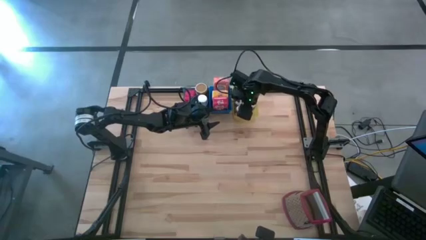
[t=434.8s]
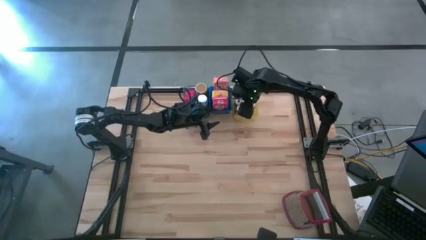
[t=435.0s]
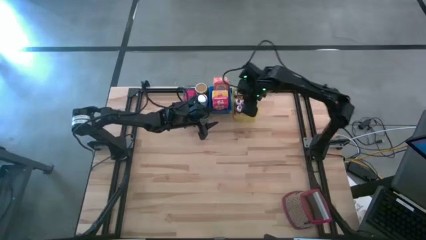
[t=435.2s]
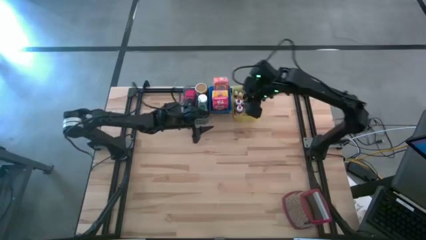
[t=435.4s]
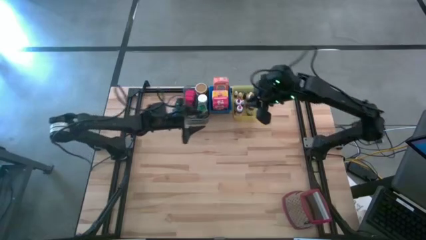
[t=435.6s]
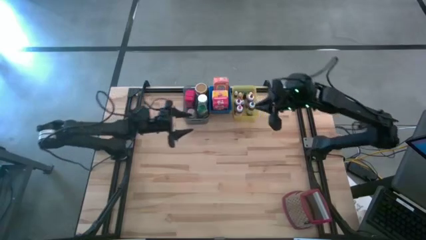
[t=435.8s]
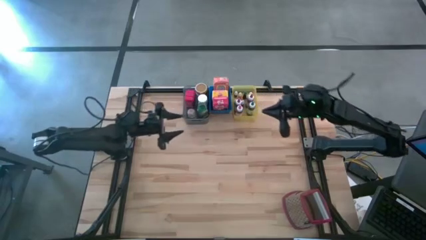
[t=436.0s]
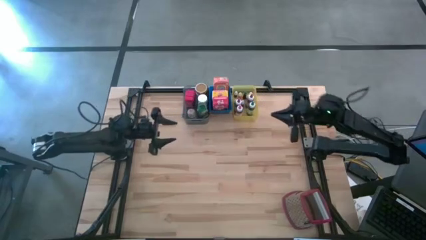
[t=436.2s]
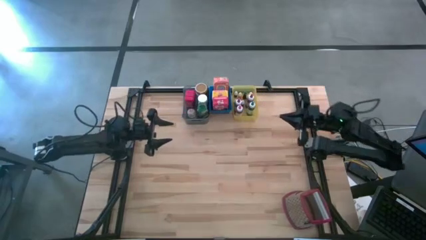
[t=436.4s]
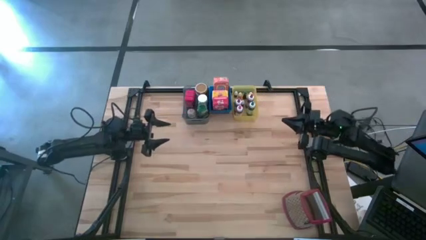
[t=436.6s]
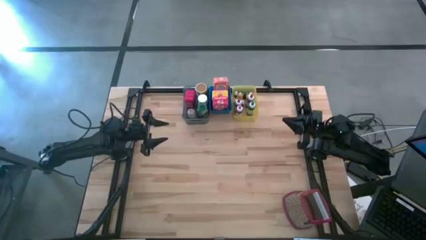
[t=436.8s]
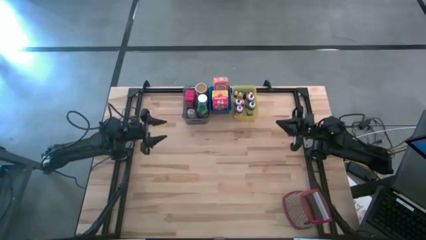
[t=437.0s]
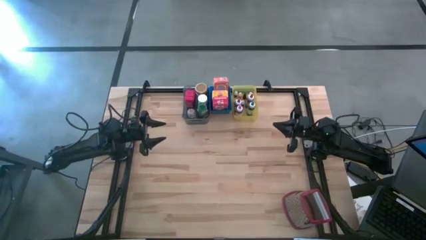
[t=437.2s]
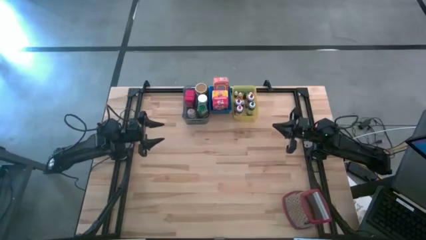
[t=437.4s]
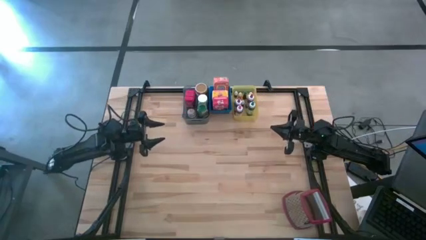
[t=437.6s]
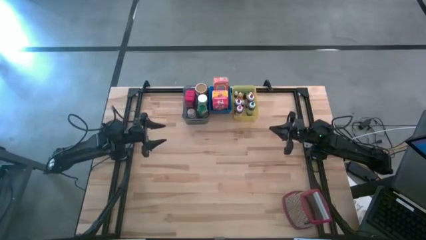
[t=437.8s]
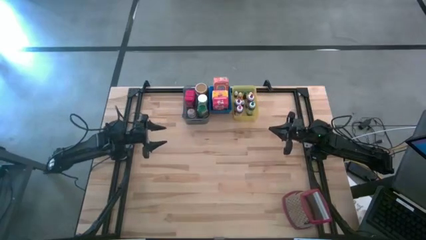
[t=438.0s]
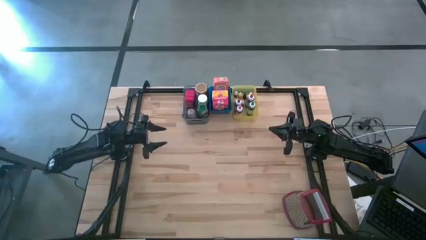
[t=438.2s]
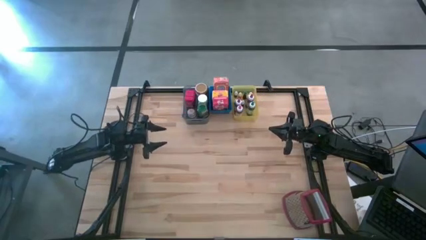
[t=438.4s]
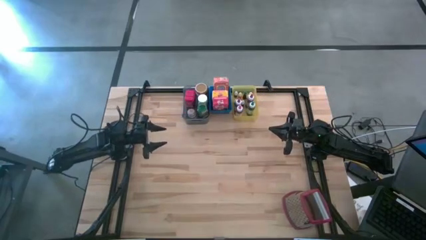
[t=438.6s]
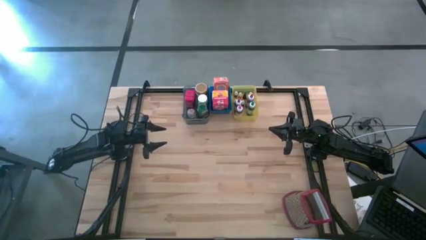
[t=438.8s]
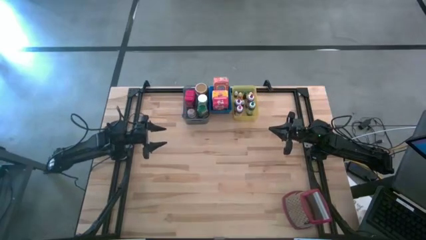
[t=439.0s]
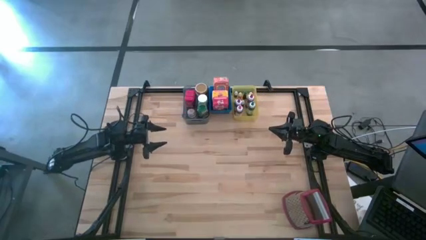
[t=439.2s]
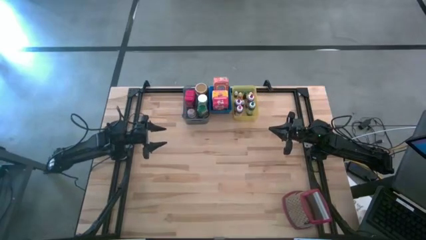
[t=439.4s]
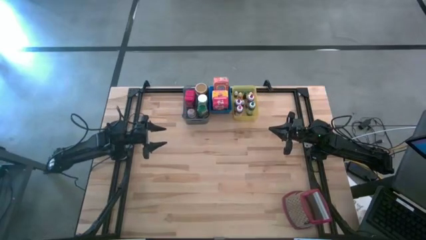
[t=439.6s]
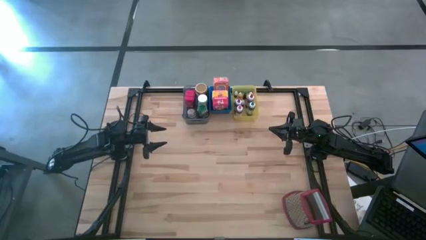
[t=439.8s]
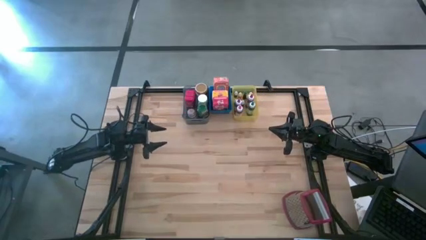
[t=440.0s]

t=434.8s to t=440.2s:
Task: Pick & Place Kitchen Items
Return to Home Position

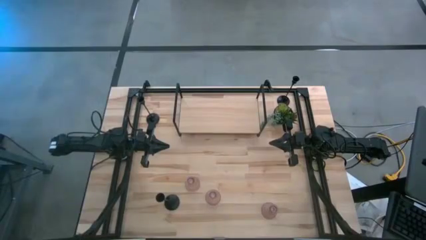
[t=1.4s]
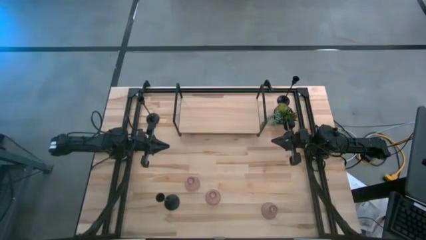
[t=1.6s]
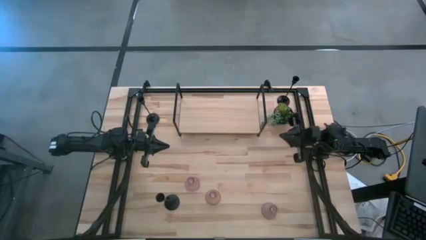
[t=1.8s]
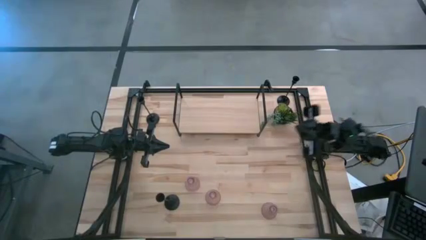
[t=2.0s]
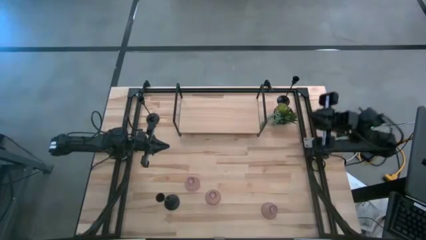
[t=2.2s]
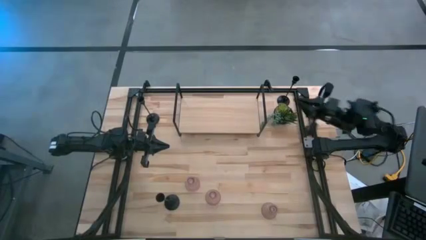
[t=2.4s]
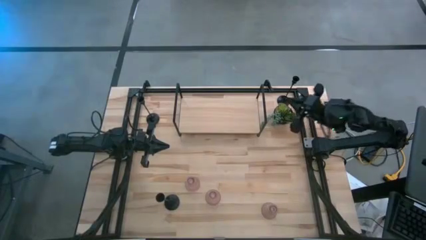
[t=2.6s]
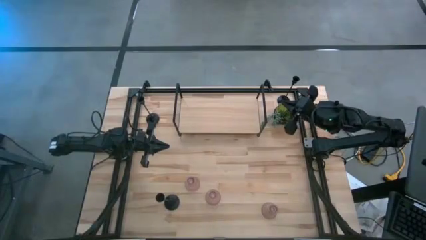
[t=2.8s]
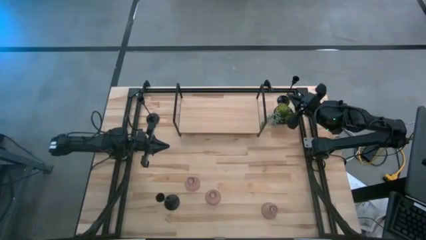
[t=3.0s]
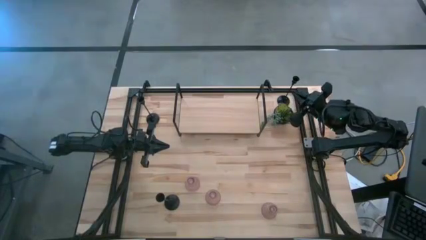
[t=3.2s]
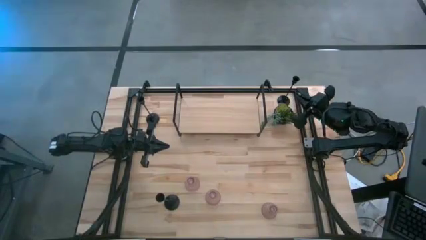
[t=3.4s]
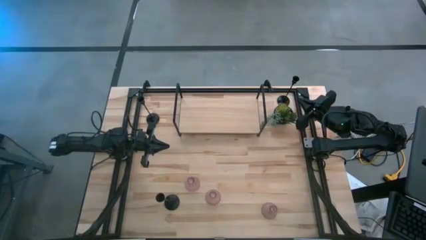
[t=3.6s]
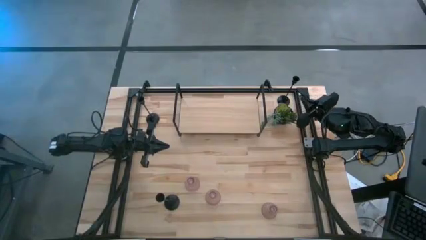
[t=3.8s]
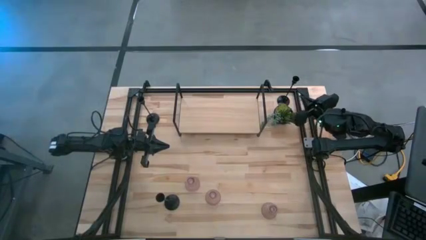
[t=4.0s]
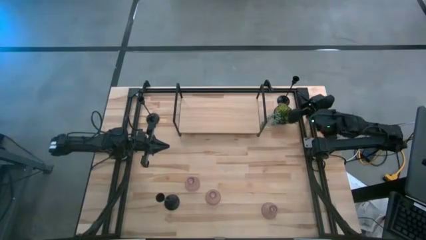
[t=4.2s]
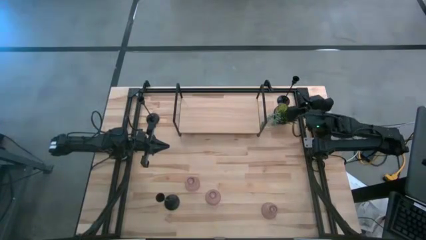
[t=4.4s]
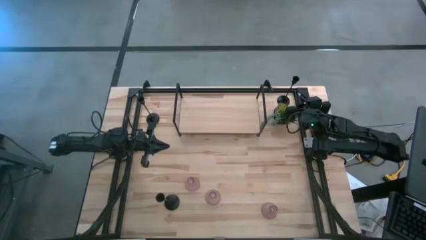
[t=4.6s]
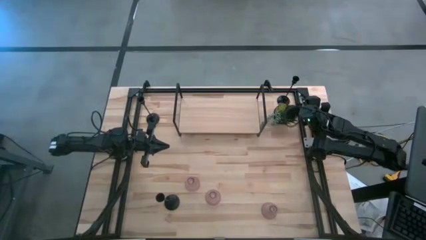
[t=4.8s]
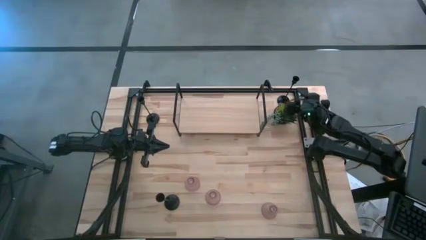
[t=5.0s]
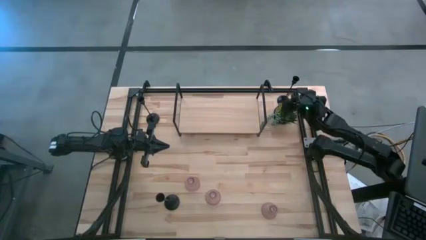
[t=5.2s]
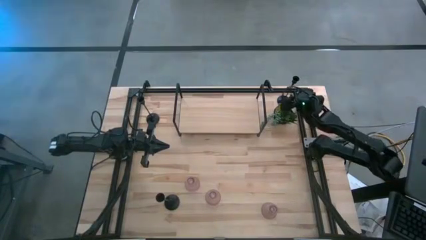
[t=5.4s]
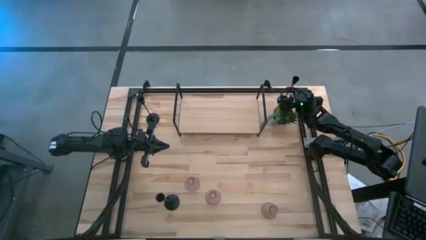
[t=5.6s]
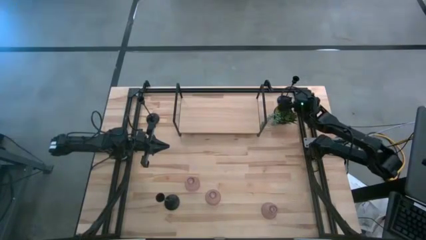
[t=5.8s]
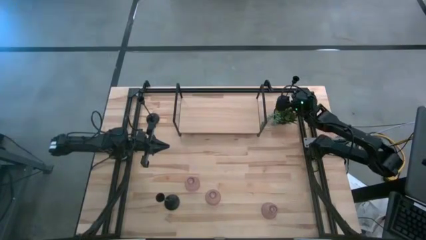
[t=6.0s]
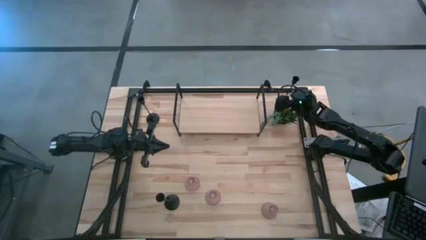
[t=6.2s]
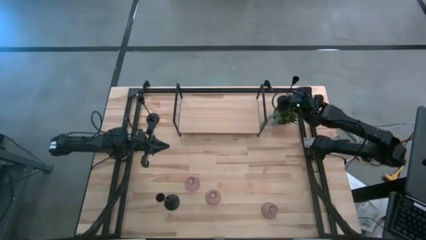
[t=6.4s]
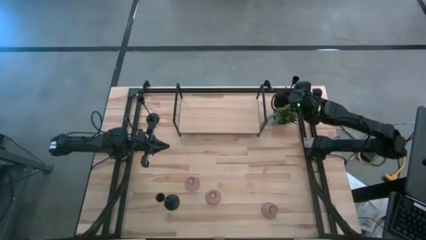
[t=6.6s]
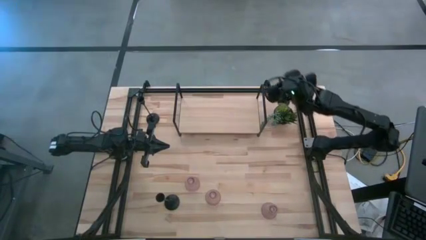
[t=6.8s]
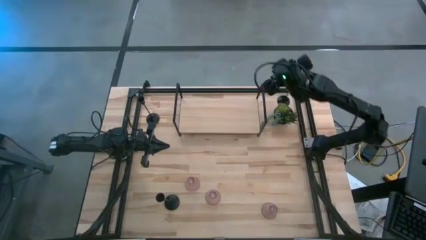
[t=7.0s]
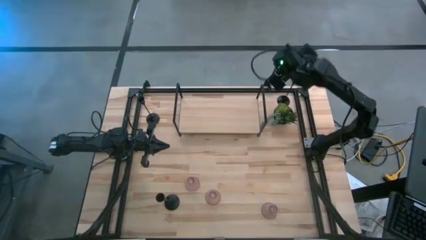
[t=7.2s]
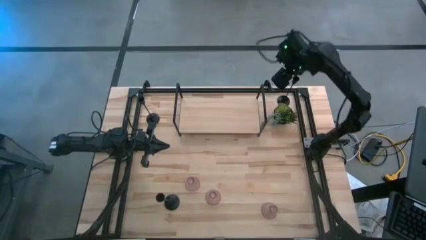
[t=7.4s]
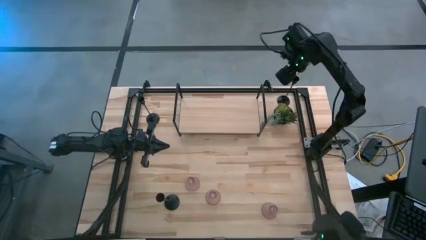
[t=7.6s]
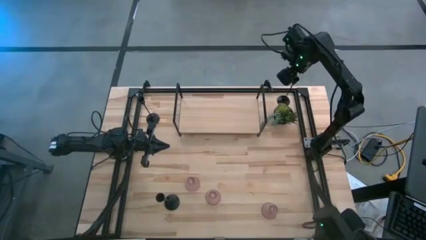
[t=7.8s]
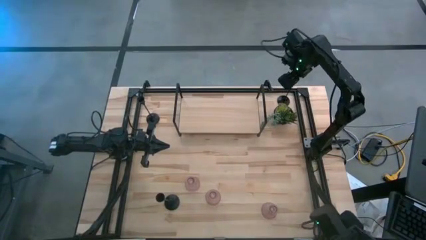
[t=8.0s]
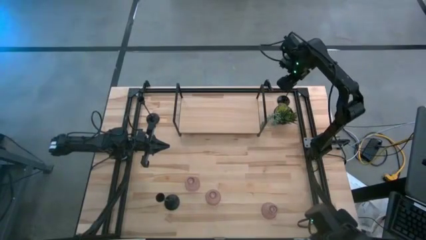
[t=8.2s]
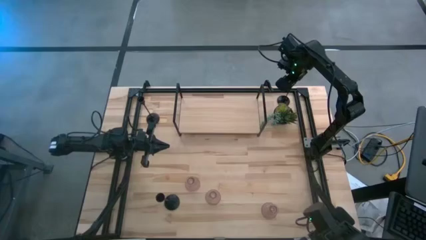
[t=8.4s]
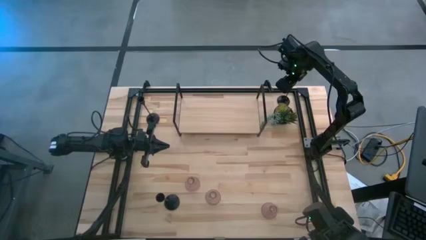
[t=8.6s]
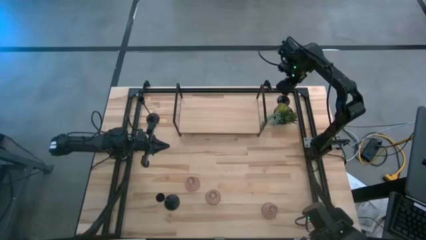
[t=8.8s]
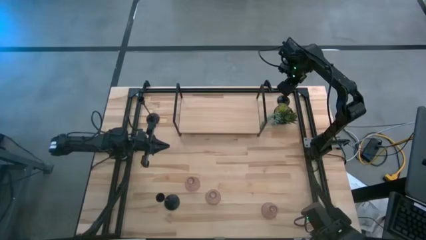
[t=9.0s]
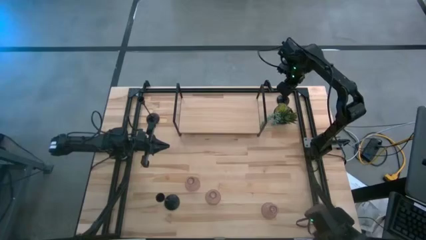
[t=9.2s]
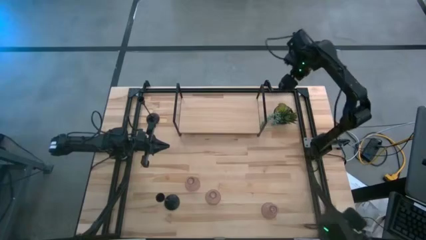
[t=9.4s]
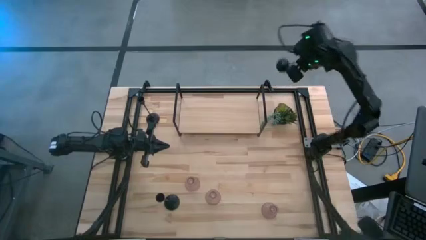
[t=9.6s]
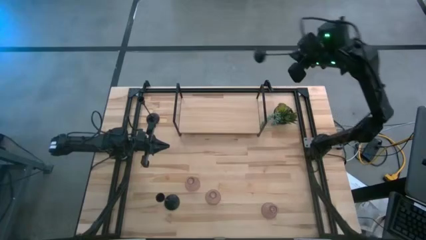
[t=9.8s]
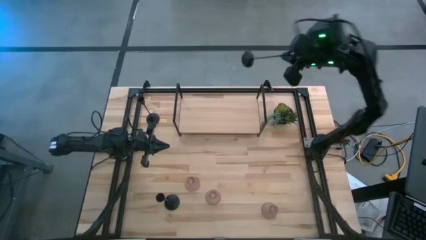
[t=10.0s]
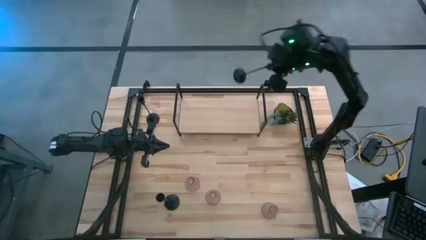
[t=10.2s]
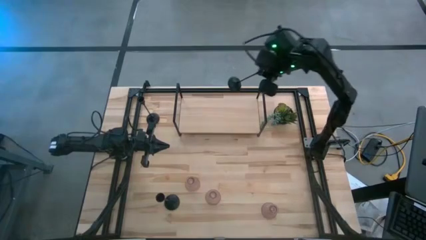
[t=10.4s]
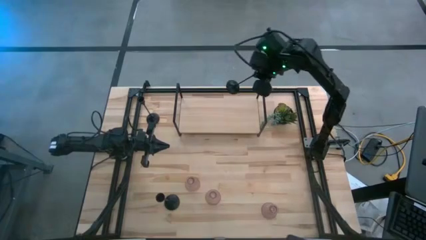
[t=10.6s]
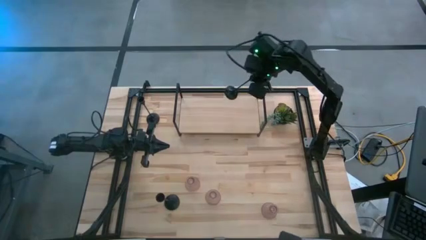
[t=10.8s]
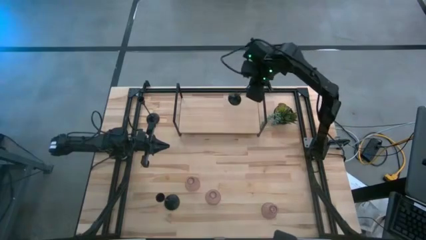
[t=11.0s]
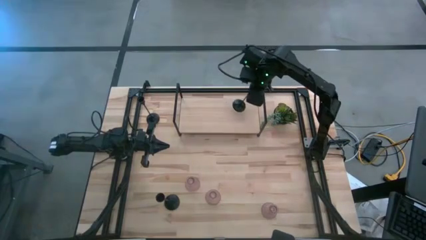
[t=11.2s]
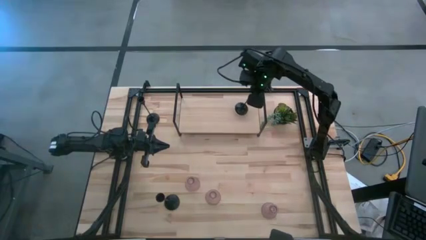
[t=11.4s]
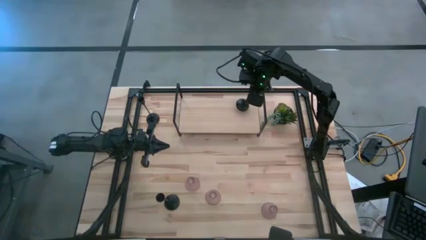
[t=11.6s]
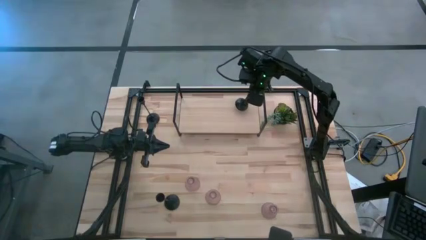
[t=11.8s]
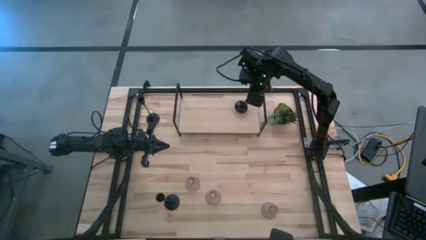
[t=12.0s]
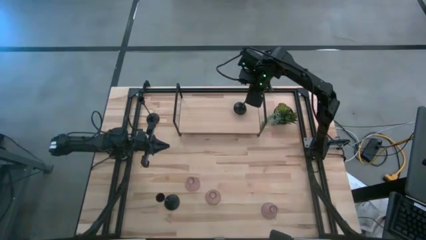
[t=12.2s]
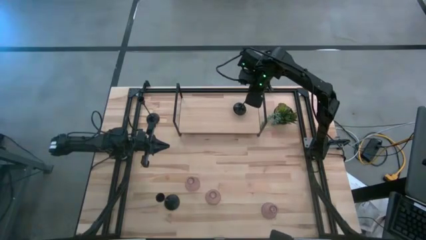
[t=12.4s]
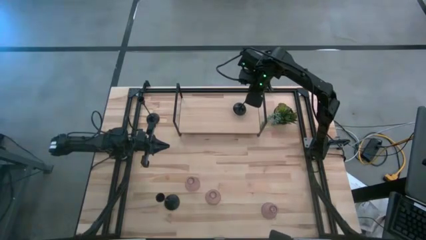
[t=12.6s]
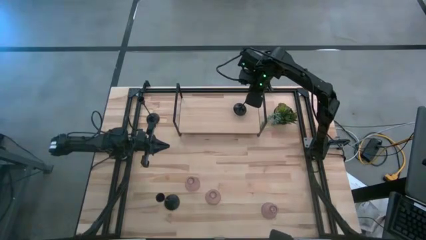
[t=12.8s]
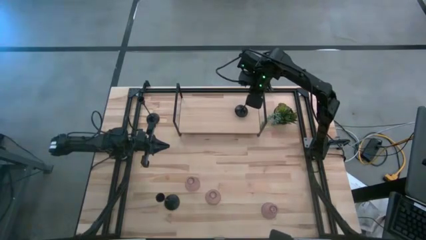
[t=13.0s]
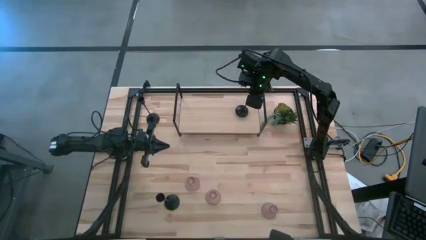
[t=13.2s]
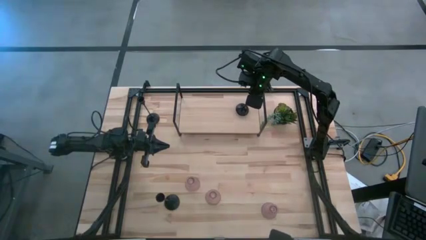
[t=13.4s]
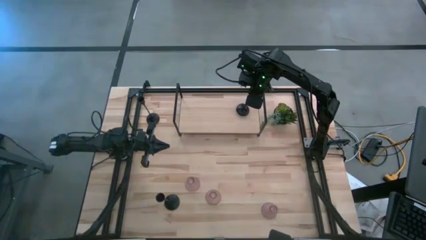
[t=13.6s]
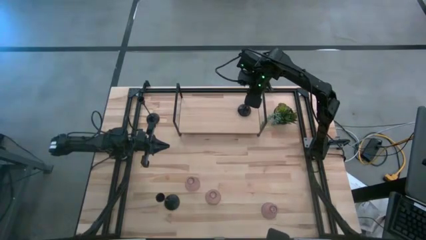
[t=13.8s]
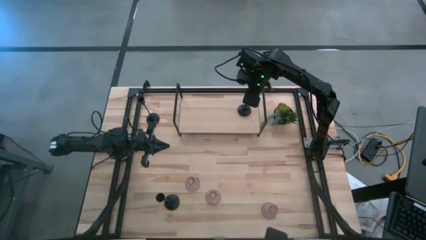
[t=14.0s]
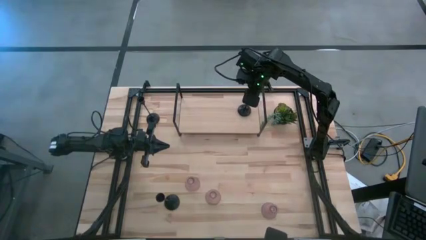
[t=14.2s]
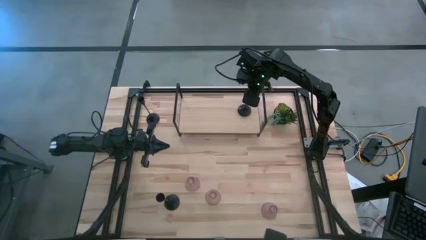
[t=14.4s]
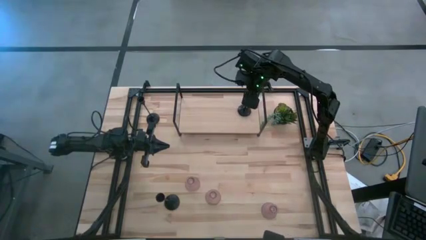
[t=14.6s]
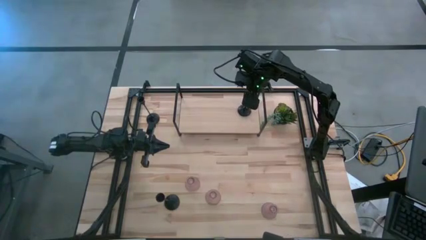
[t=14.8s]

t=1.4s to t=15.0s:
Task: Pick & Place candle stick holders
Put the top right black candle holder on the shelf
